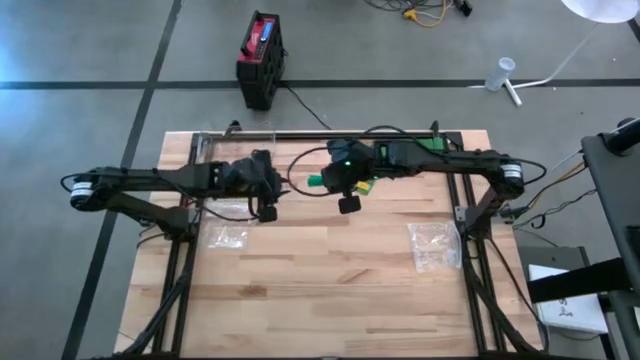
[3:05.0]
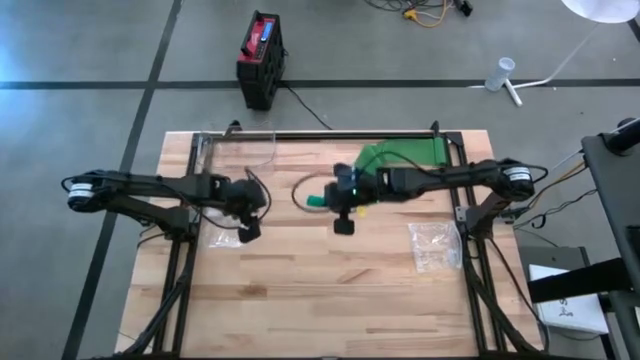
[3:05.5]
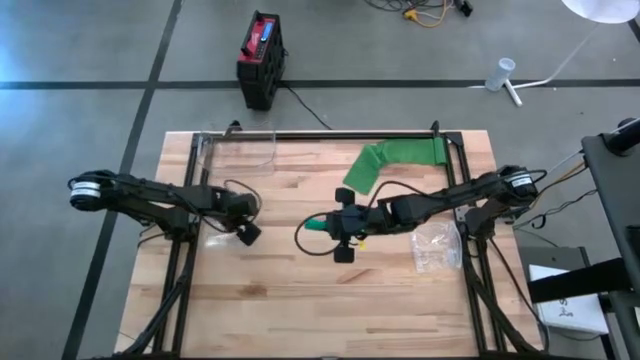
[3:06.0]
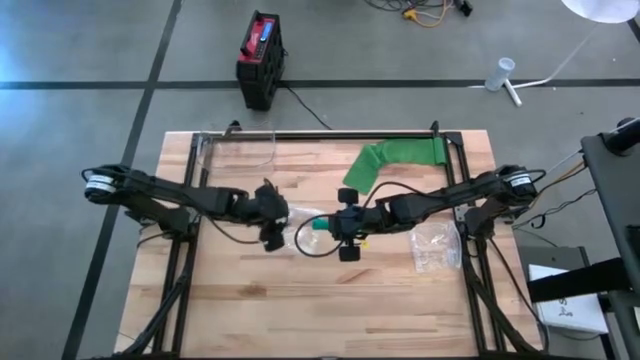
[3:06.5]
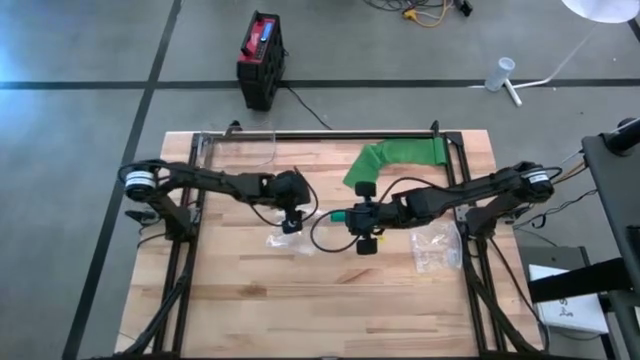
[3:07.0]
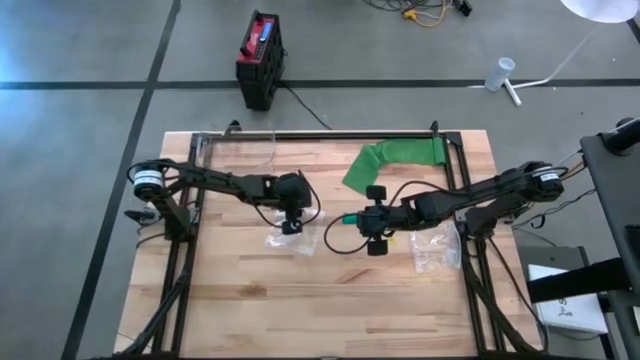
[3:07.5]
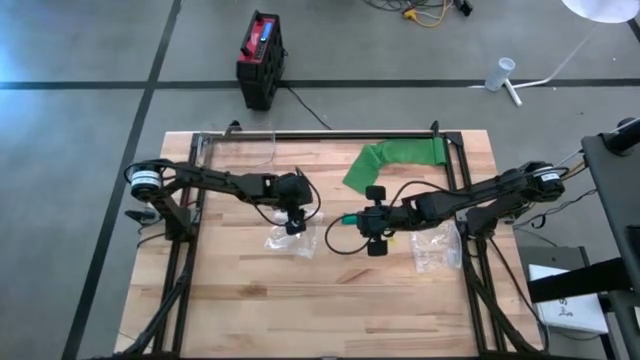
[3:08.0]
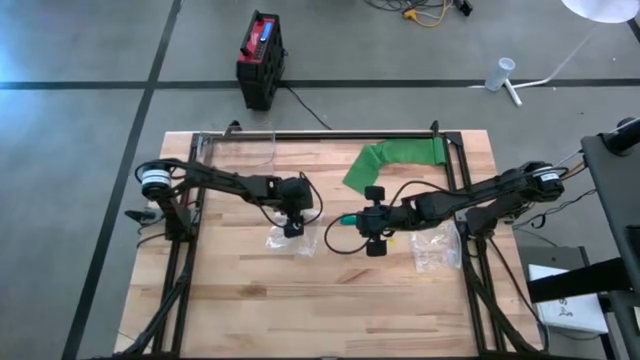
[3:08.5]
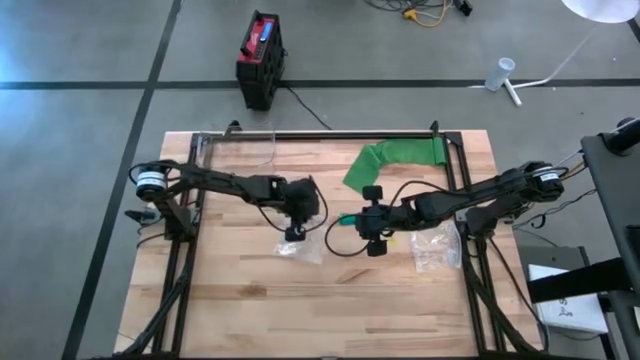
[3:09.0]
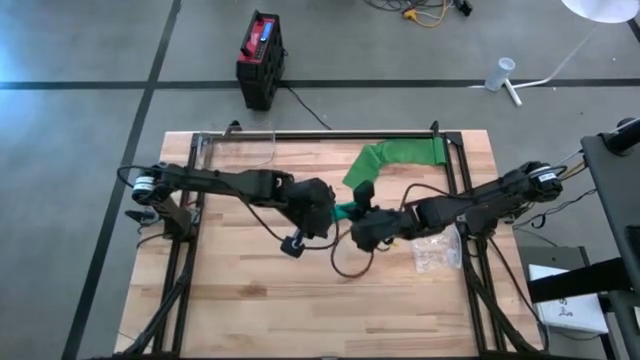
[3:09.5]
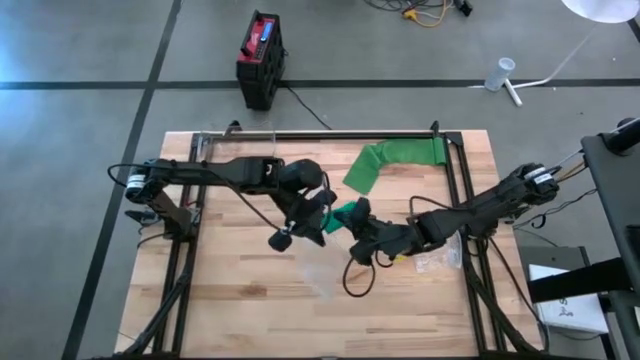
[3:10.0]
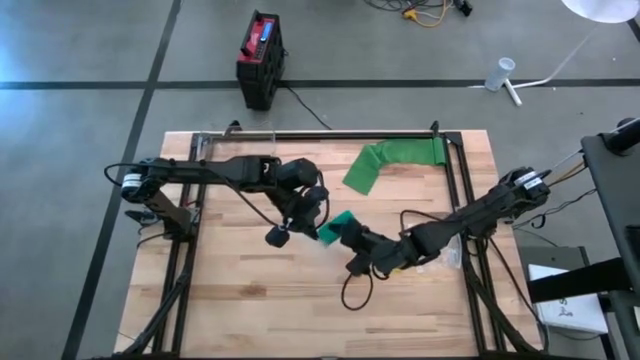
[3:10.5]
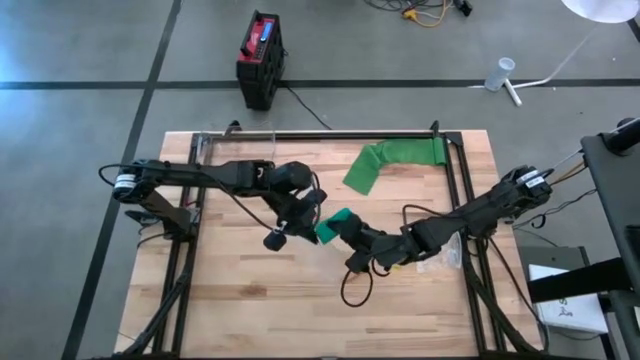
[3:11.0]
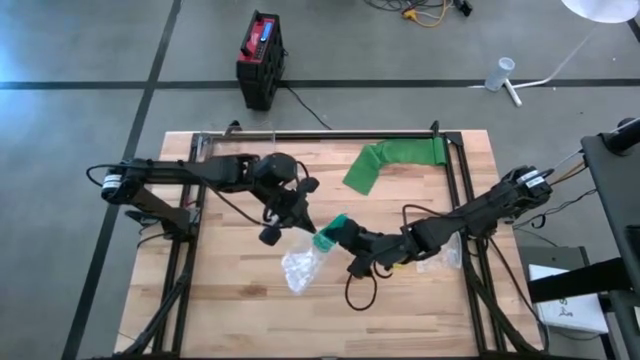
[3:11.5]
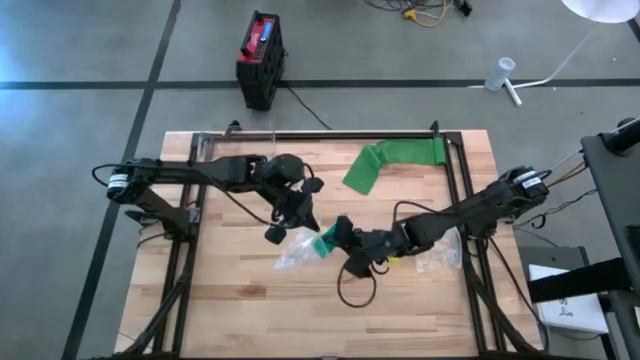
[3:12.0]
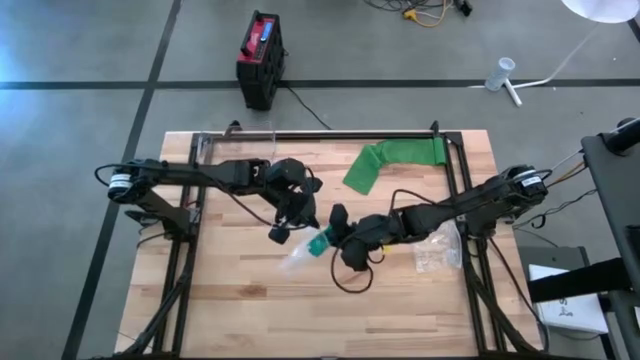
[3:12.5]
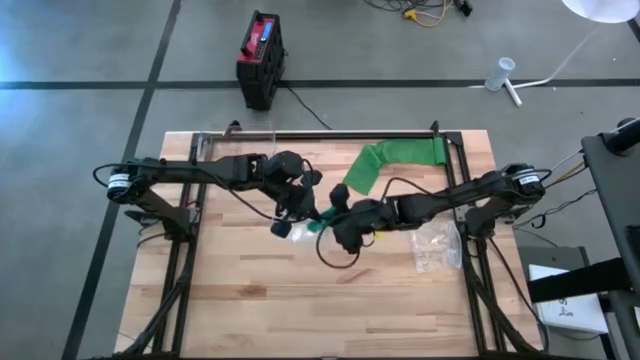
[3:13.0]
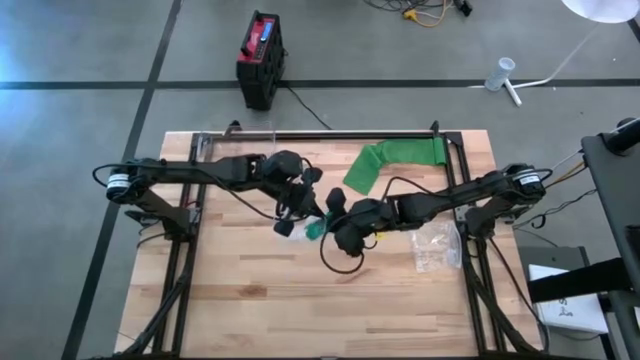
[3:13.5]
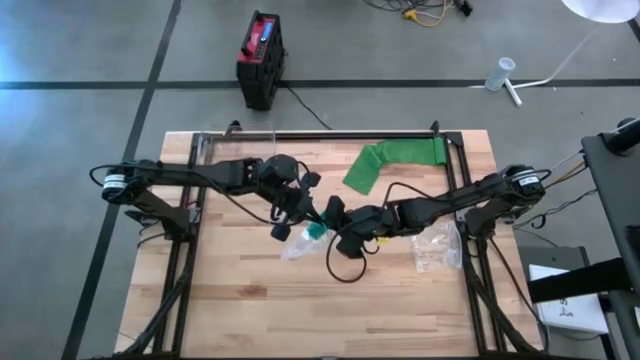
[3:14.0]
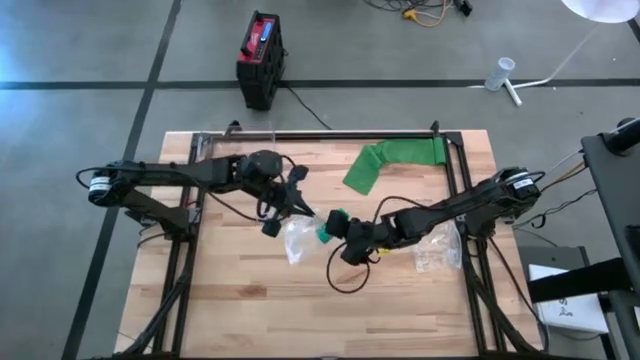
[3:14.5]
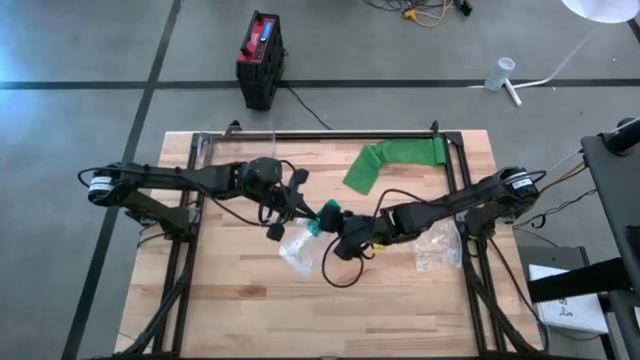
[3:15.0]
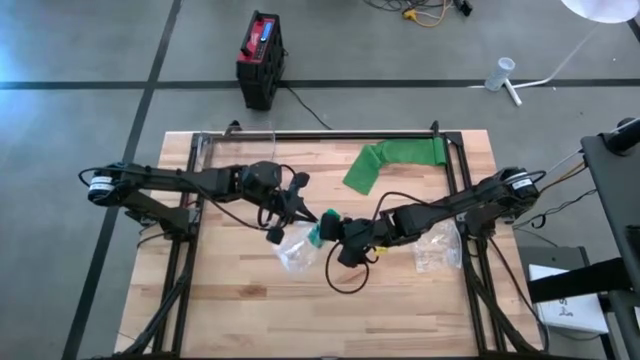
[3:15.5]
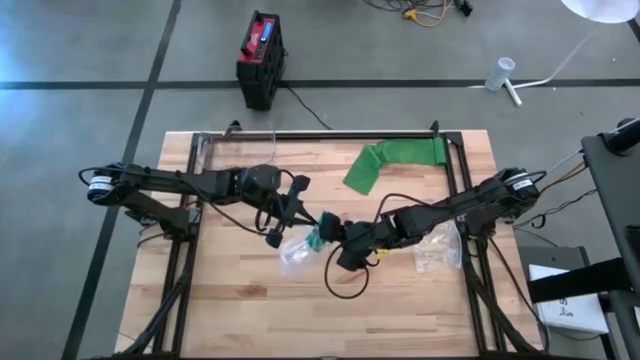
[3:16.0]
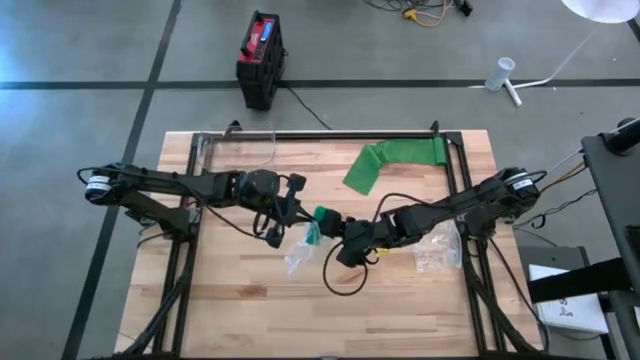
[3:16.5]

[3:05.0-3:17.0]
Task: Roll bandage
Put the blue rolled bandage into the transparent zip bag

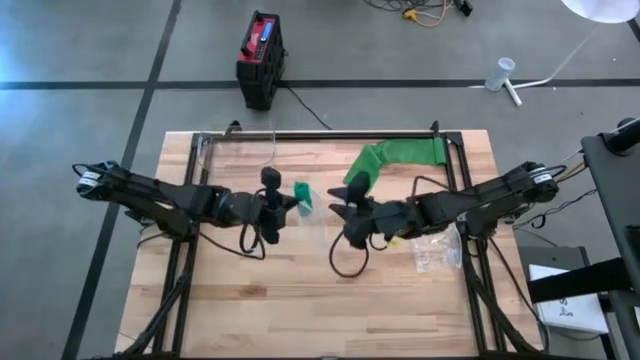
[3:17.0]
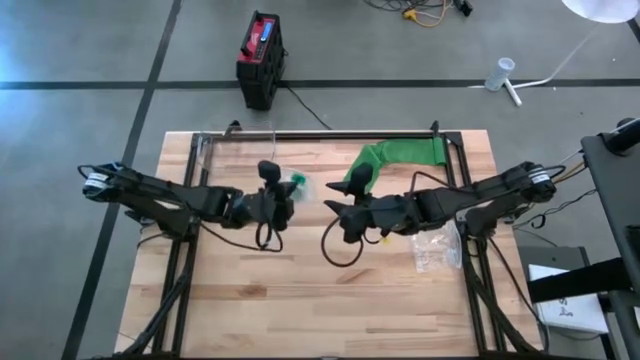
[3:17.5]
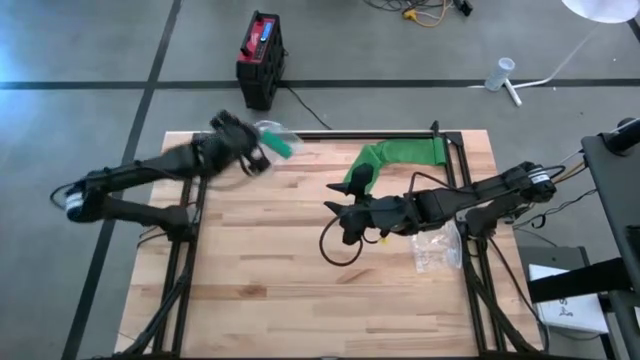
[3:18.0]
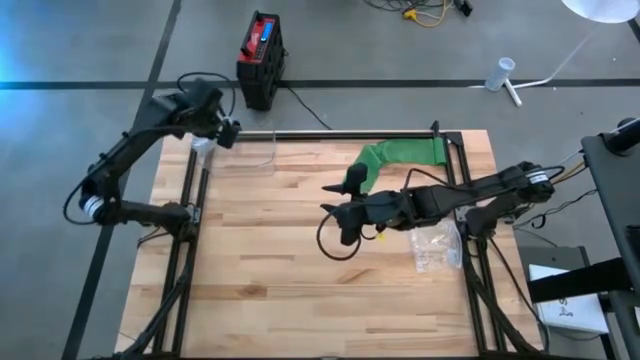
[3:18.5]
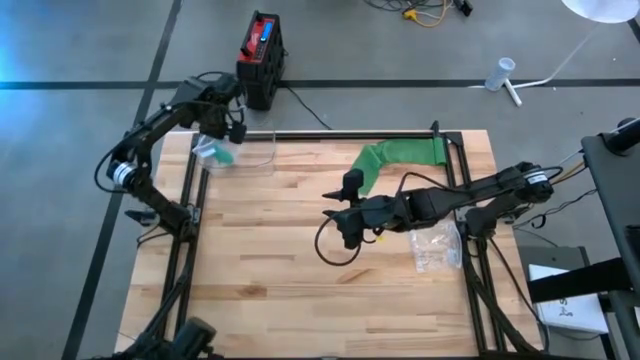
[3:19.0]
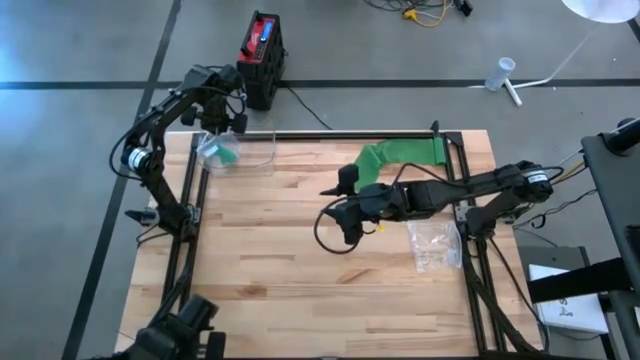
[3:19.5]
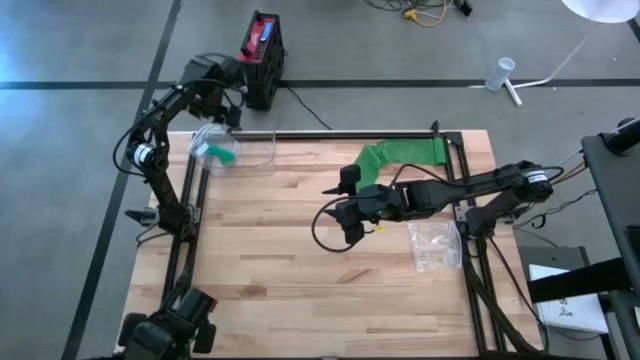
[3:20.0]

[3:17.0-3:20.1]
Put the blue rolled bandage package into the transparent bin

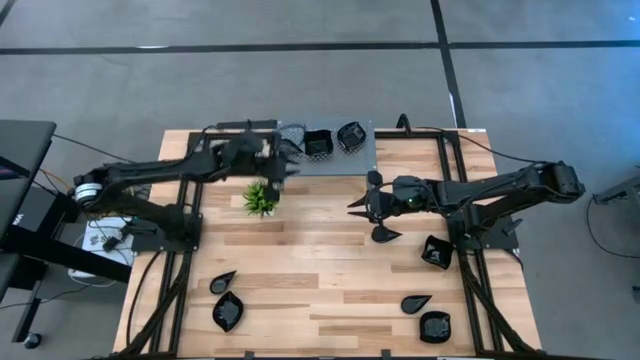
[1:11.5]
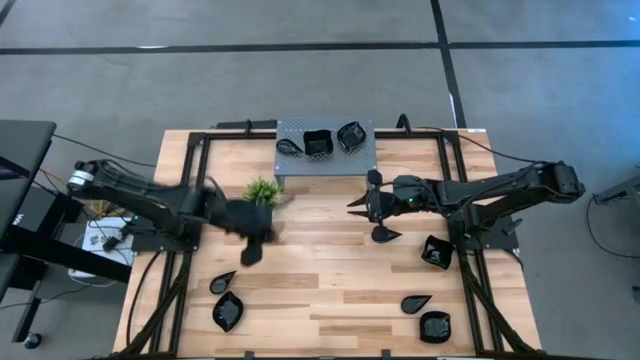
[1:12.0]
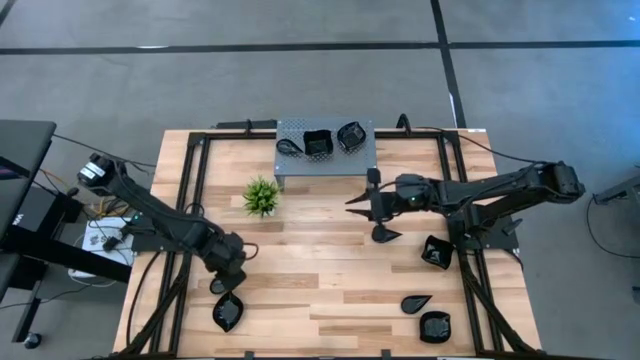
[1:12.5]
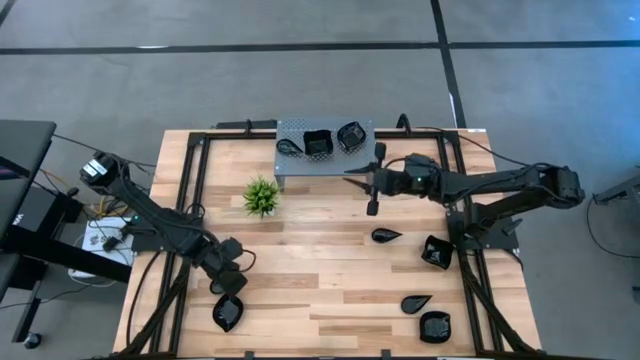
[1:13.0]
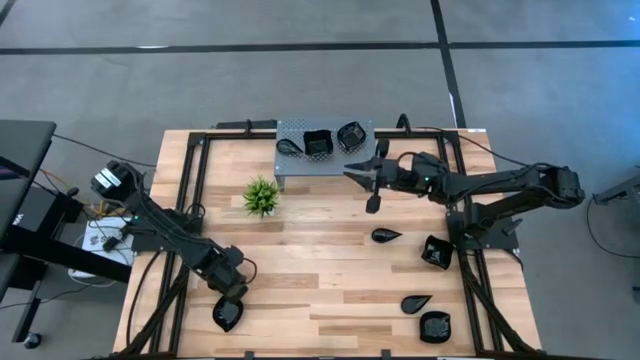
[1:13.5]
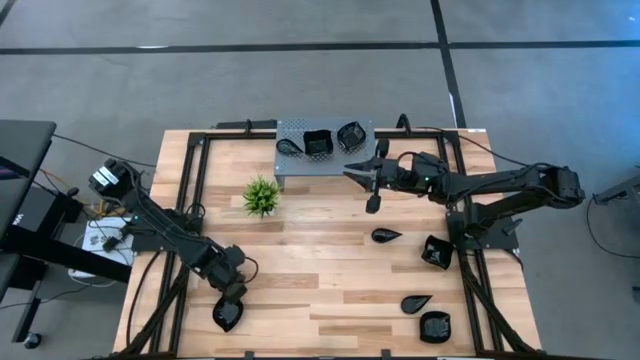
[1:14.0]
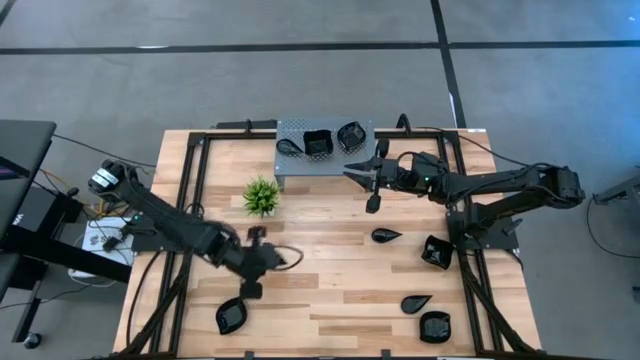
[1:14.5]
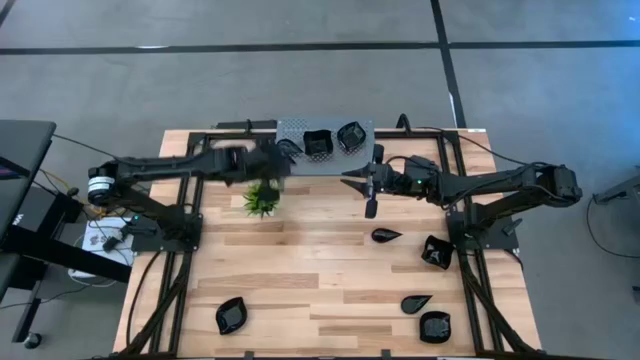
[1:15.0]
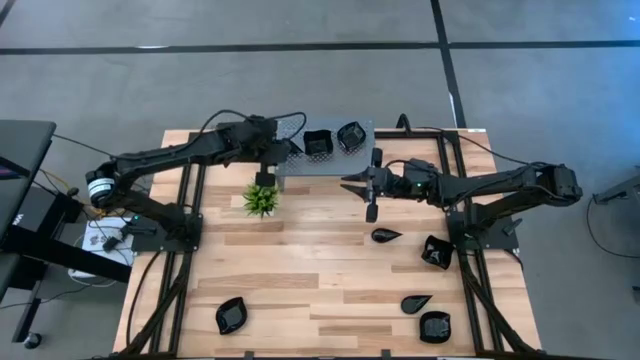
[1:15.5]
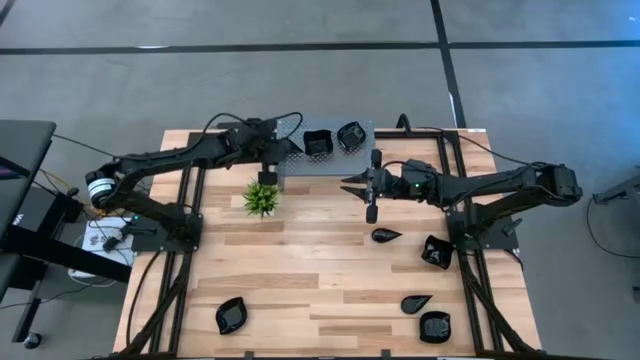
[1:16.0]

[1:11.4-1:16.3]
Task: Pick & Place Mini shaped plates
Stack the black drop-shaped plate on top of the black drop-shaped plate on the shelf

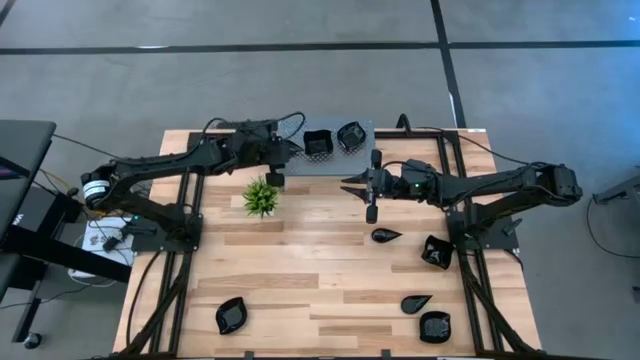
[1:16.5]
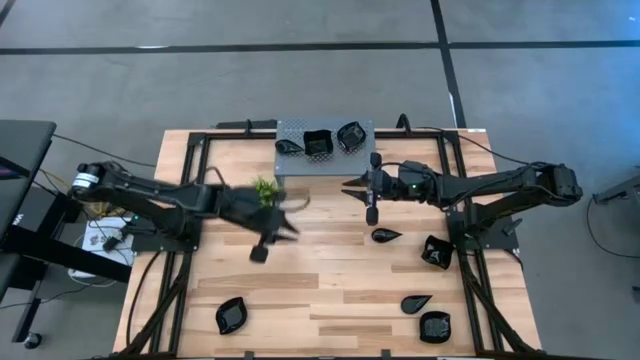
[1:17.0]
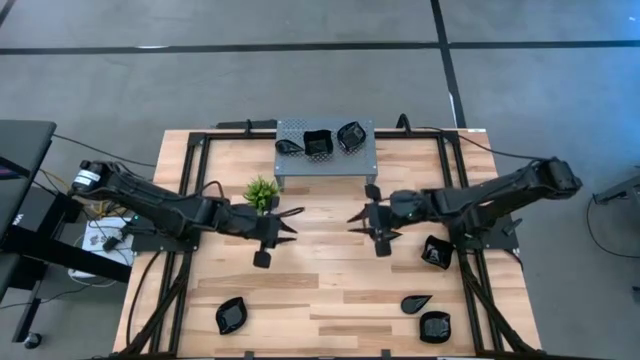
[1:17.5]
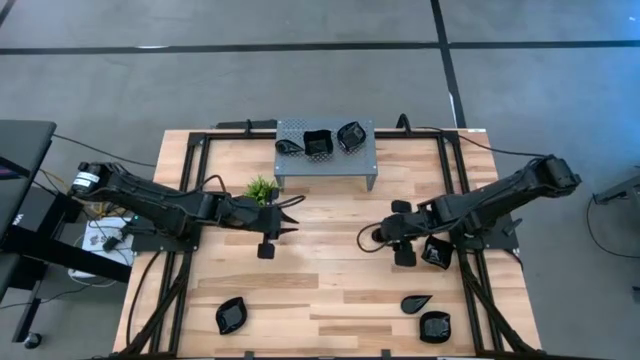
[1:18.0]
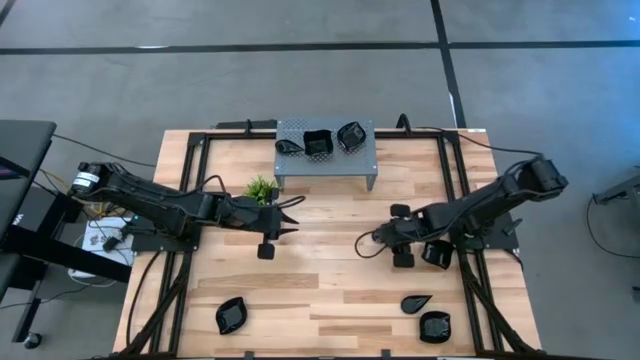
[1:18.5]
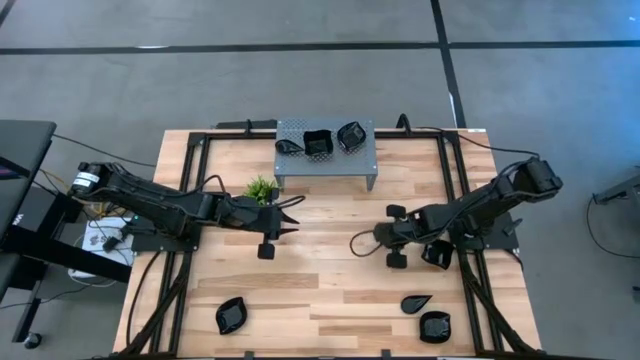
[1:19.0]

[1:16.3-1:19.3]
Stack the black drop-shaped plate on top of the black drop-shaped plate on the shelf
